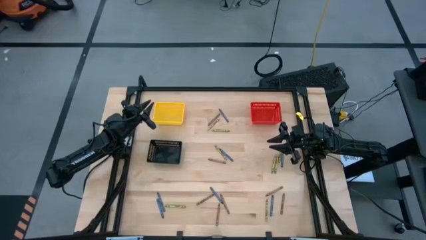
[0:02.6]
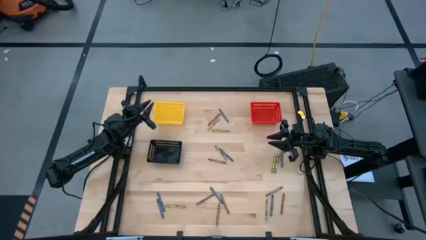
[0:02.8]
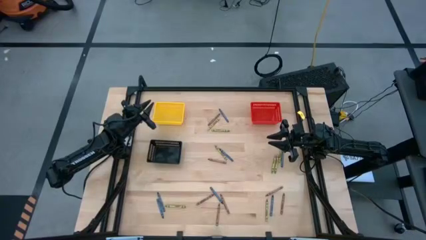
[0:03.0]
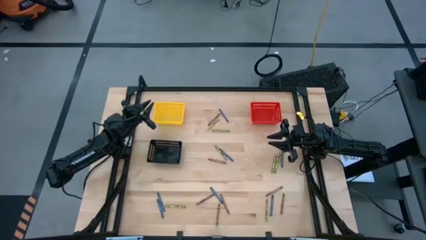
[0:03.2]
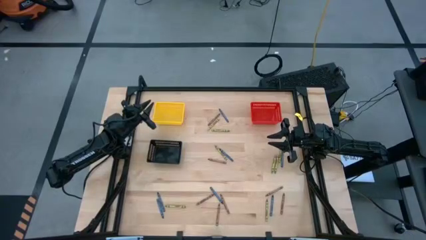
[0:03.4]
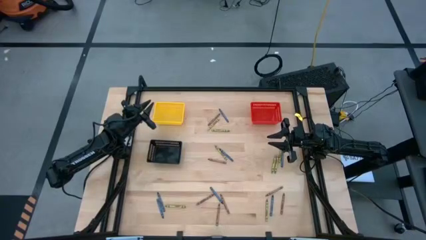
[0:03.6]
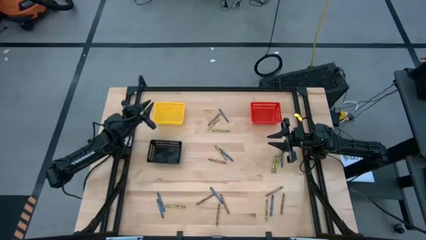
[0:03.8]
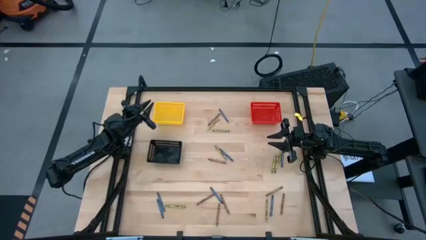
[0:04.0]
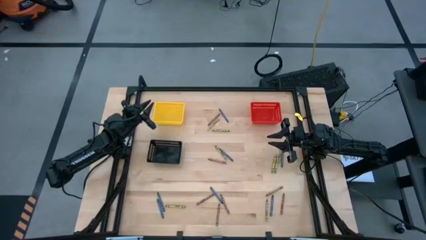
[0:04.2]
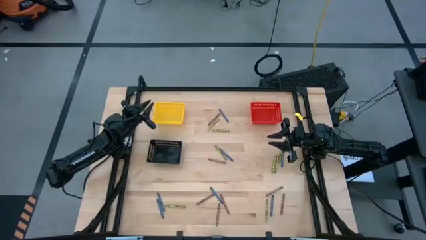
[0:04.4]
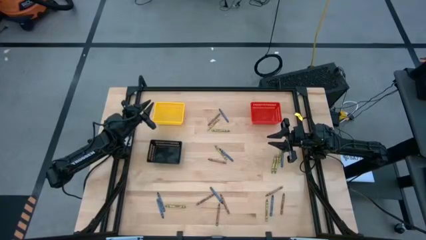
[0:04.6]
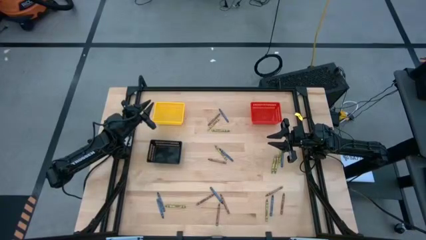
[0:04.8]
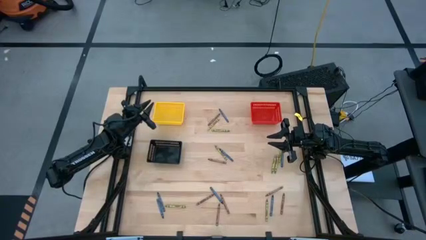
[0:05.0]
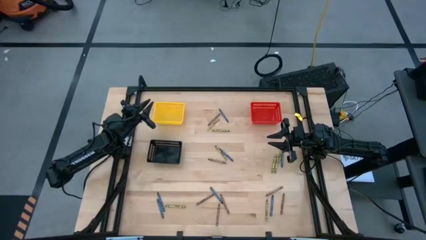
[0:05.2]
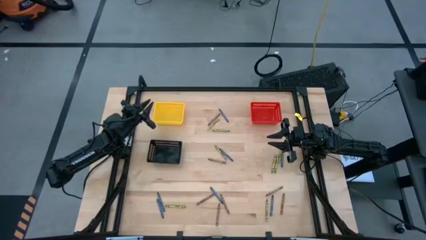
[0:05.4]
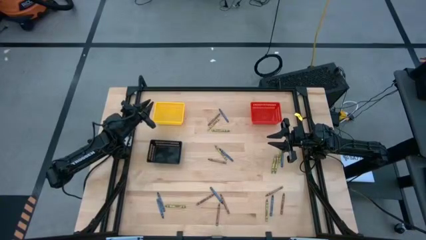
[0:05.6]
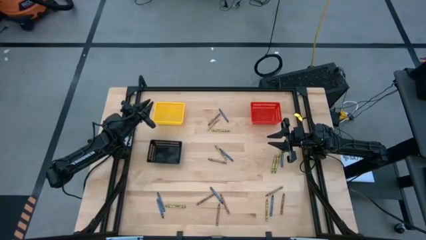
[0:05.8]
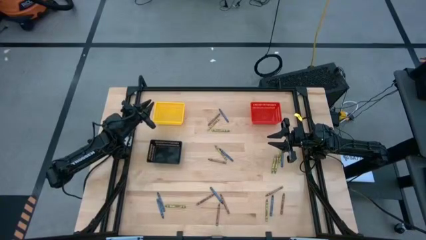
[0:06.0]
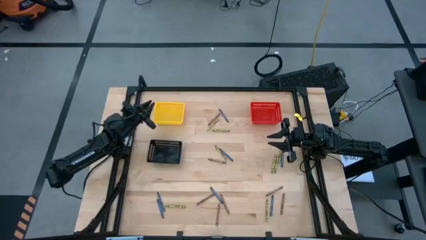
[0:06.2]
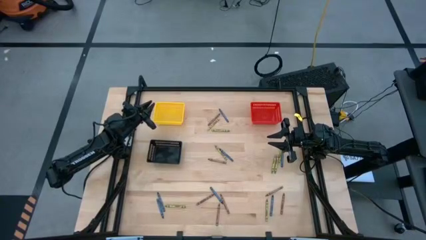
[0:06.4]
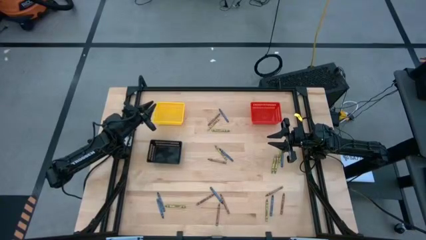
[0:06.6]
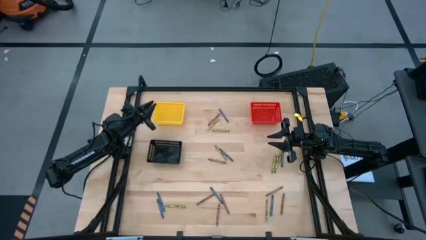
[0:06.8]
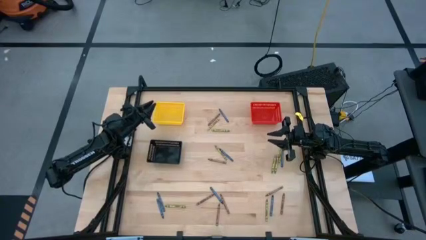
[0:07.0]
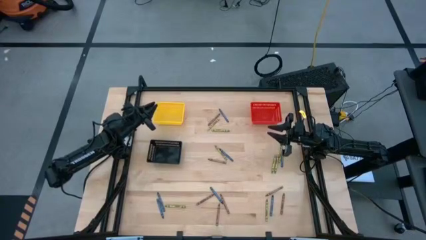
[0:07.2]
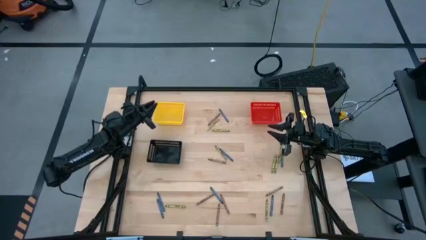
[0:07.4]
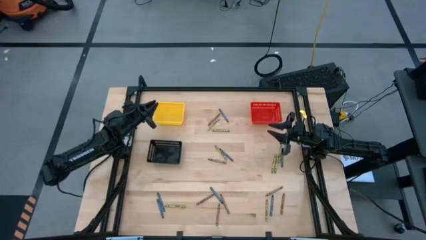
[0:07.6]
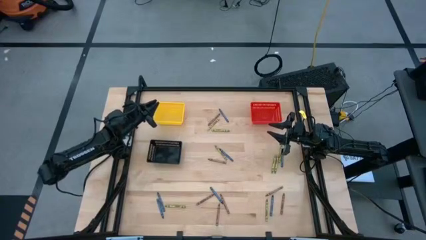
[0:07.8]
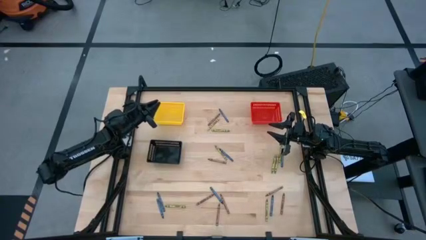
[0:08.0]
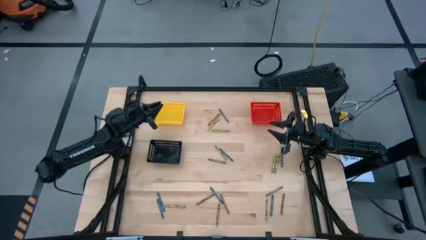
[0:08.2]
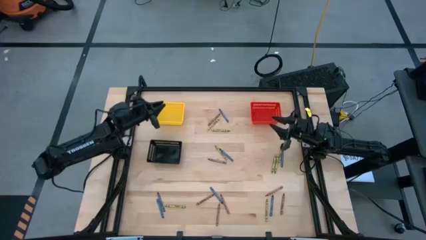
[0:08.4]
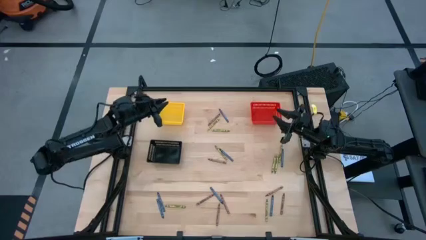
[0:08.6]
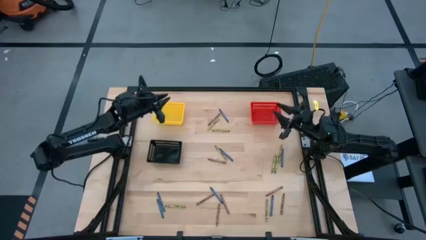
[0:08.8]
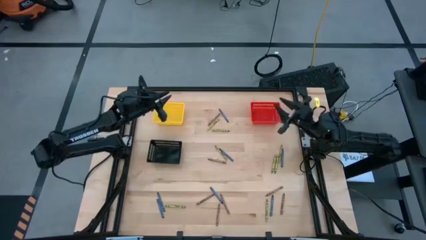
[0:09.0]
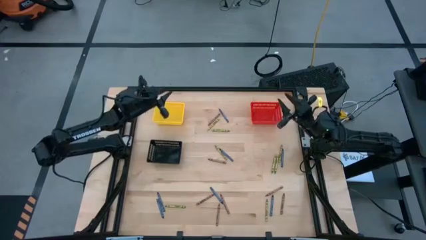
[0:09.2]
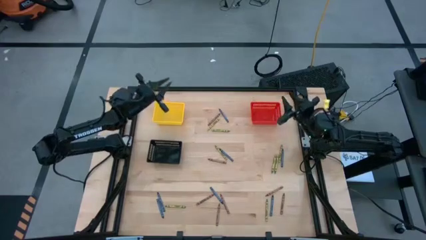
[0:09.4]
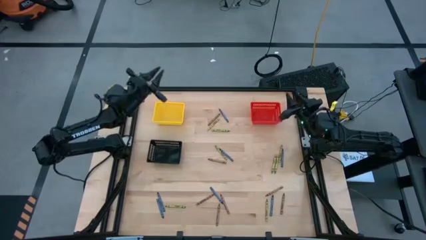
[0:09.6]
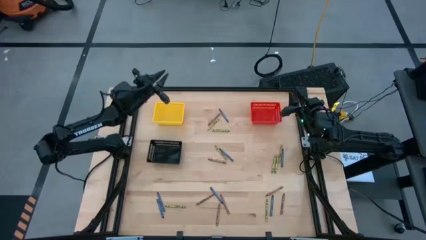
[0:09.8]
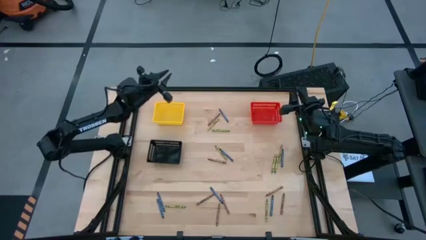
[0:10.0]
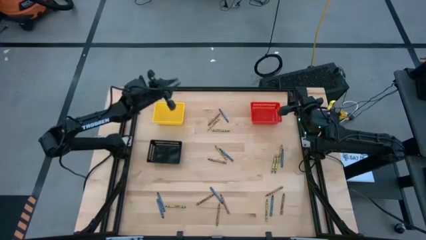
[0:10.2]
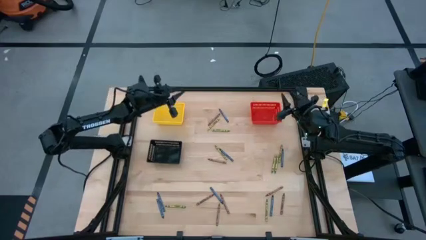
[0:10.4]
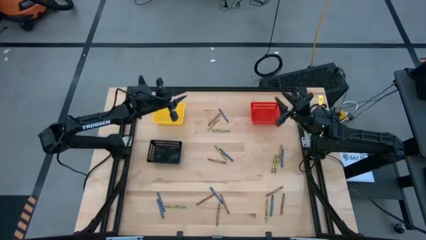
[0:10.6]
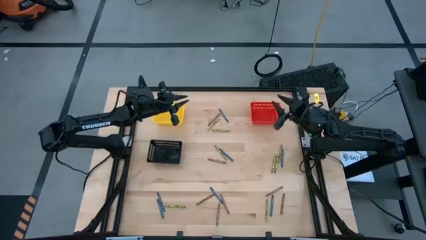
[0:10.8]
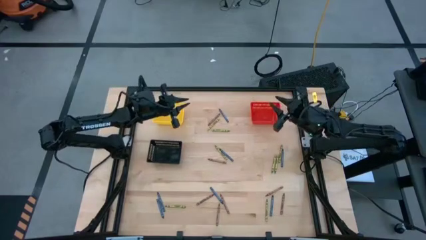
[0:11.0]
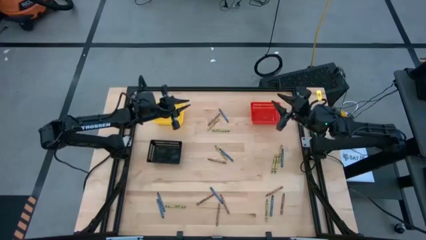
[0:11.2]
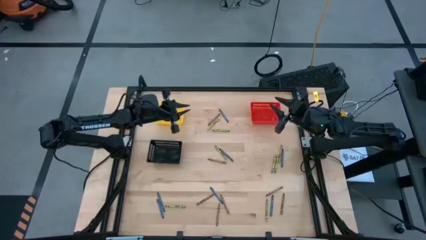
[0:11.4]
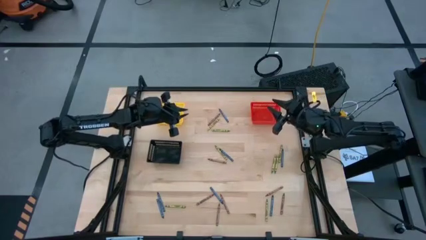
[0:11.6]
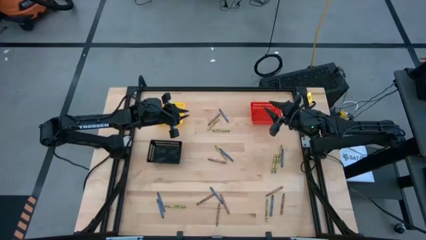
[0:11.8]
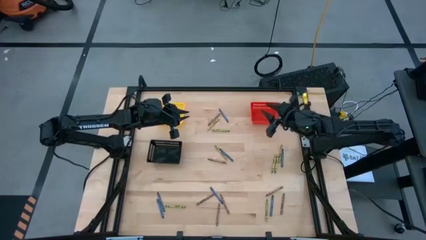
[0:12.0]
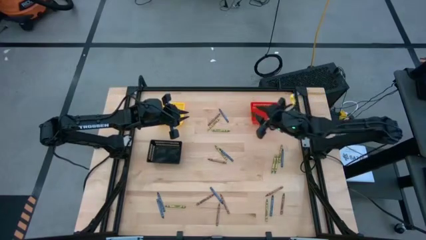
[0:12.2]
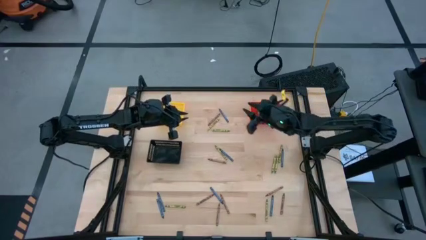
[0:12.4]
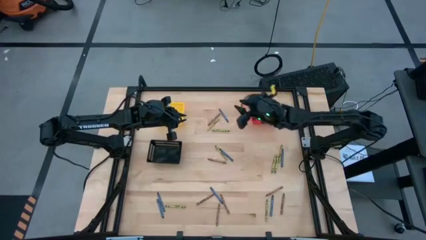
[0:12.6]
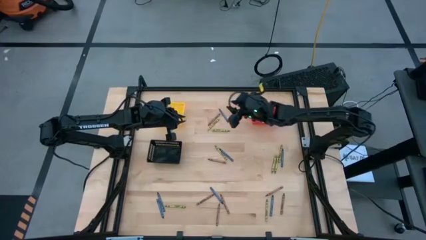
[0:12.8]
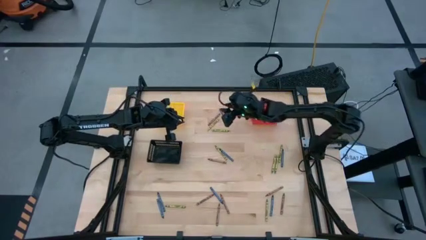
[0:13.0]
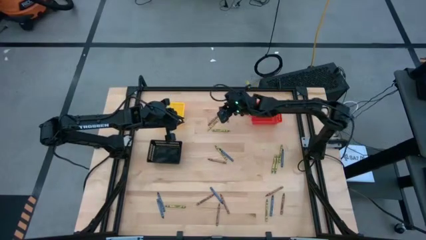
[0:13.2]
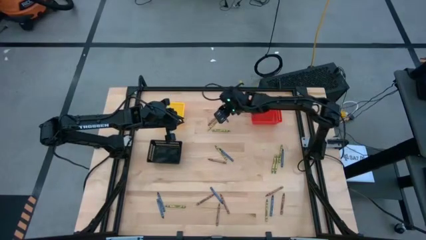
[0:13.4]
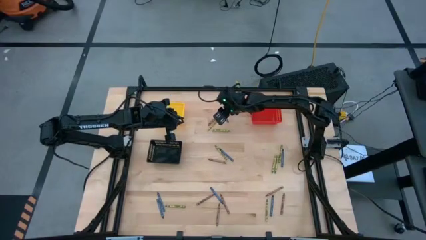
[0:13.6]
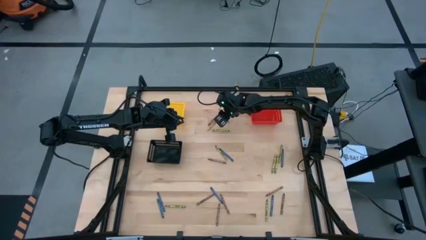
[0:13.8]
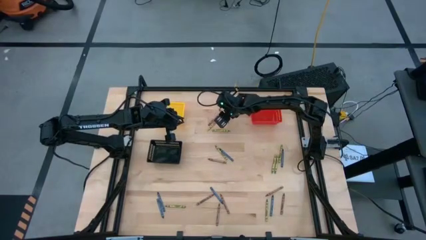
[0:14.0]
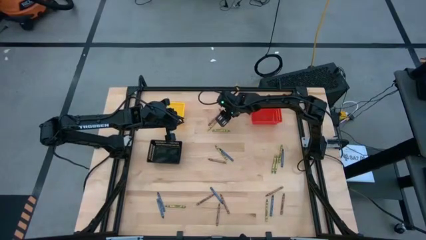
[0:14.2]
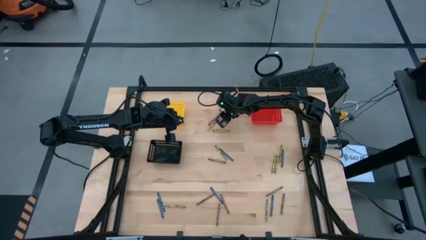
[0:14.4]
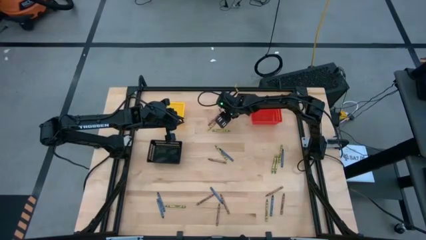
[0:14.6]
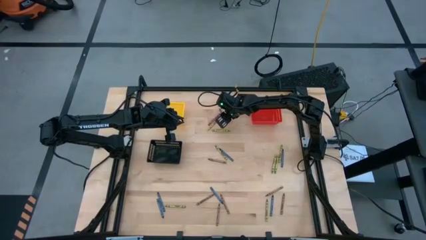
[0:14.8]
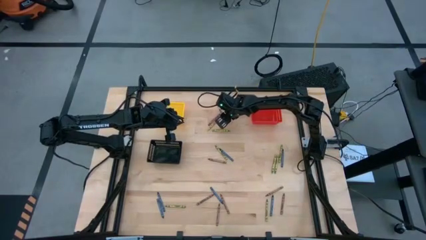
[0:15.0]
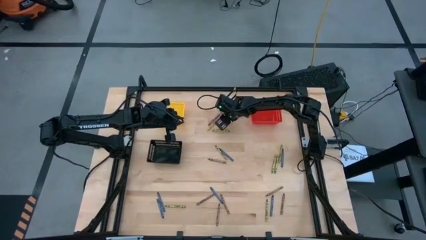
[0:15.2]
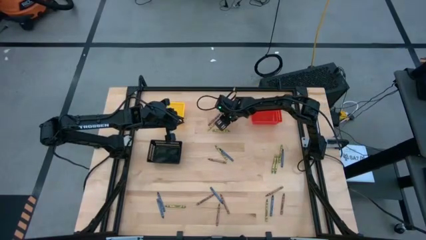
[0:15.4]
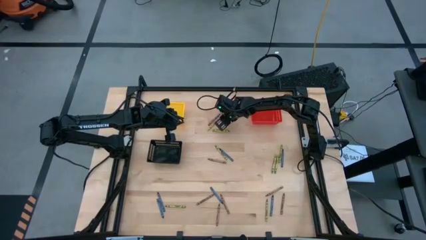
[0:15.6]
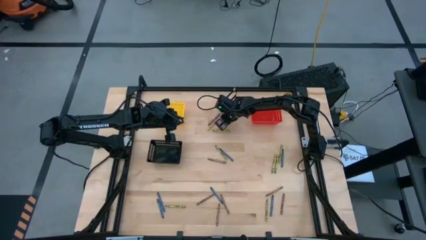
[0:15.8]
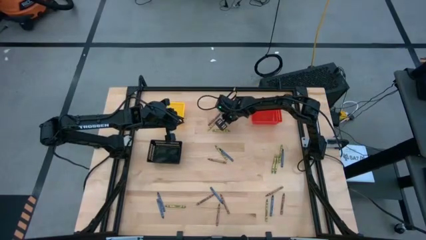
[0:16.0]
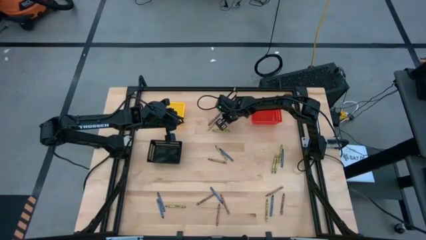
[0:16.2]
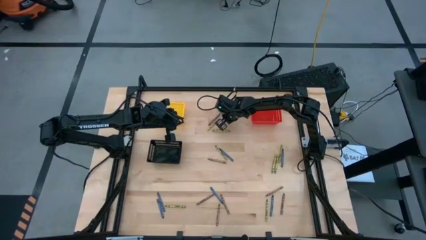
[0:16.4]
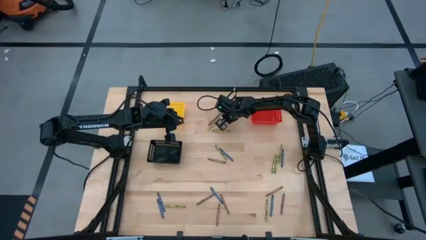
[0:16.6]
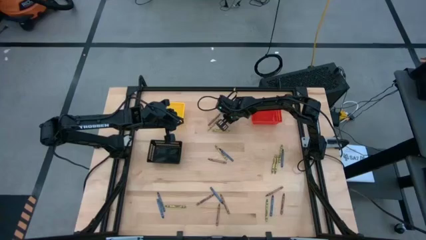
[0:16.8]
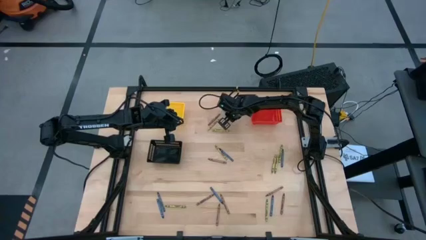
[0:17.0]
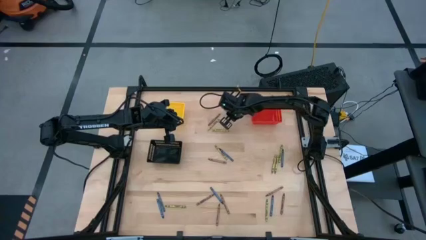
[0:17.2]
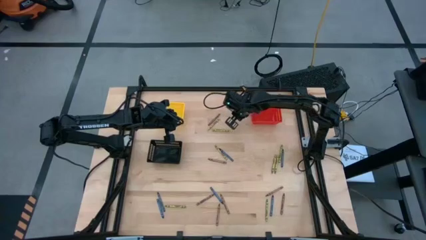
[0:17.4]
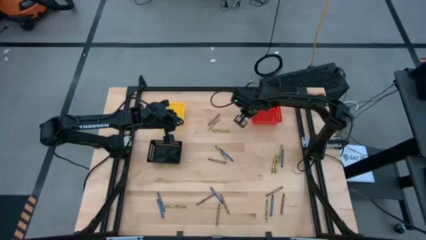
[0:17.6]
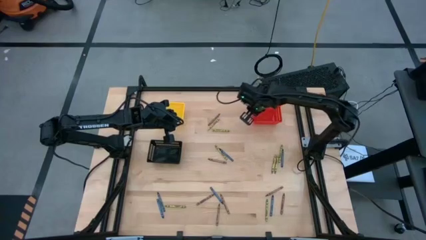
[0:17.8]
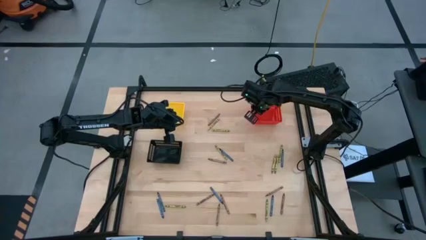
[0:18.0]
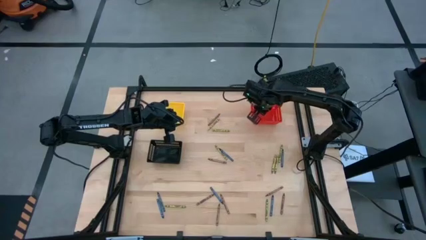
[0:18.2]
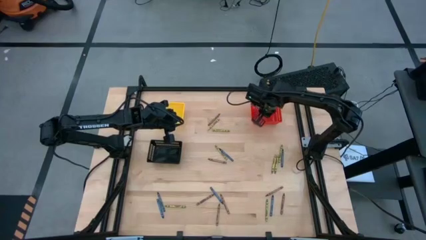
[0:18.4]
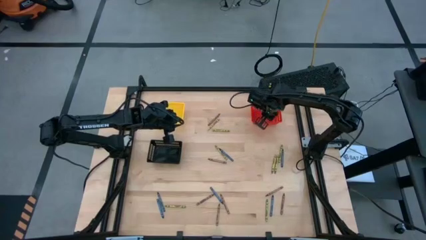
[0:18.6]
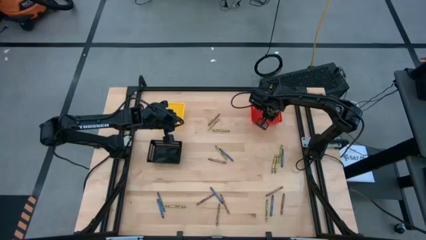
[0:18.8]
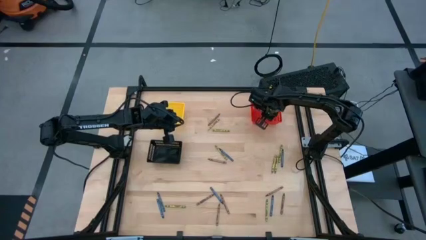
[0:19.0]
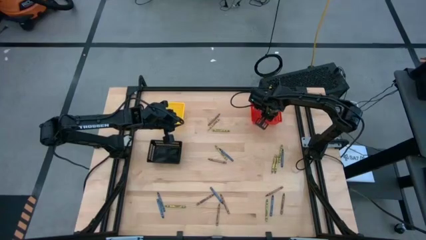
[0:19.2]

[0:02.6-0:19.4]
Task: Sort crayons
Put the blue crayon into the red bin
